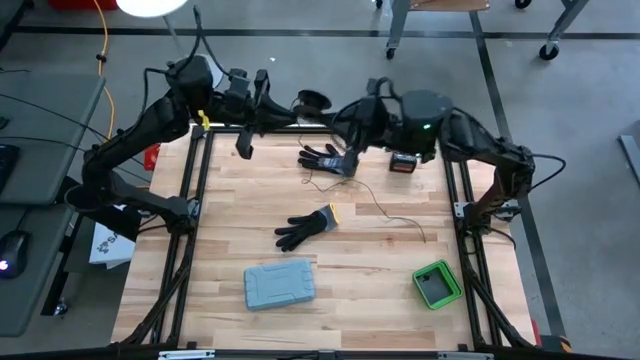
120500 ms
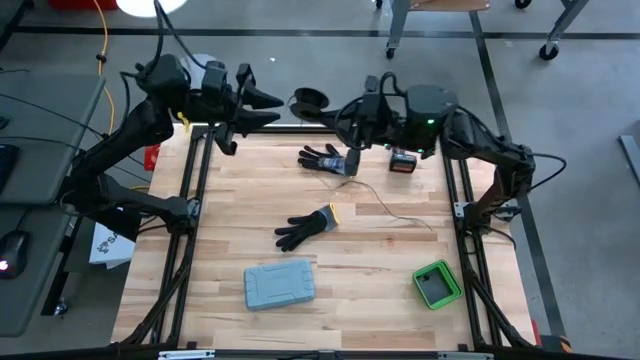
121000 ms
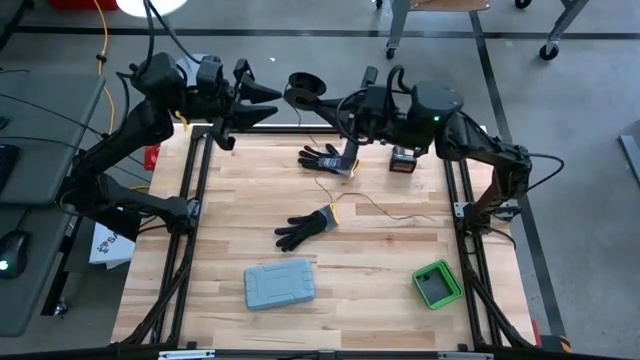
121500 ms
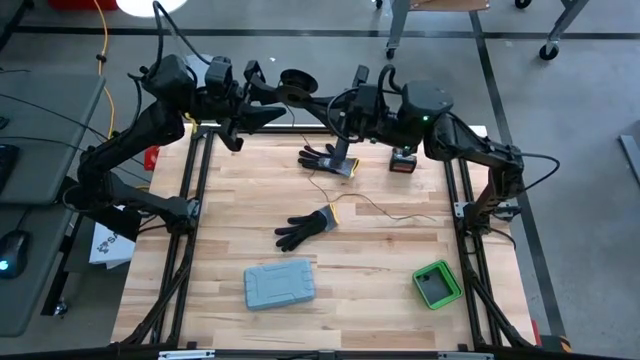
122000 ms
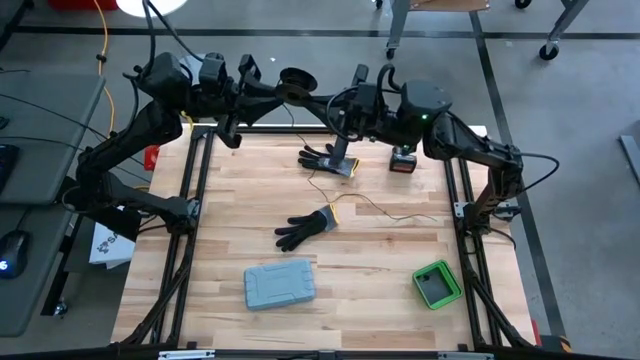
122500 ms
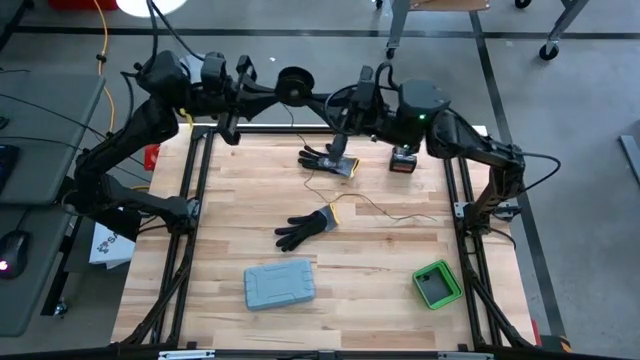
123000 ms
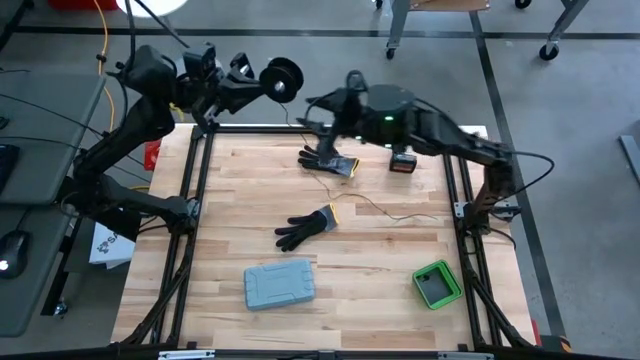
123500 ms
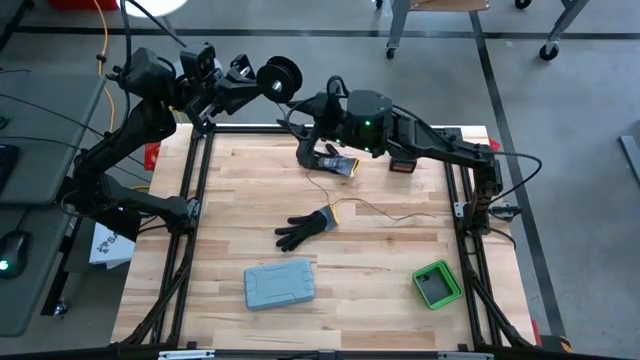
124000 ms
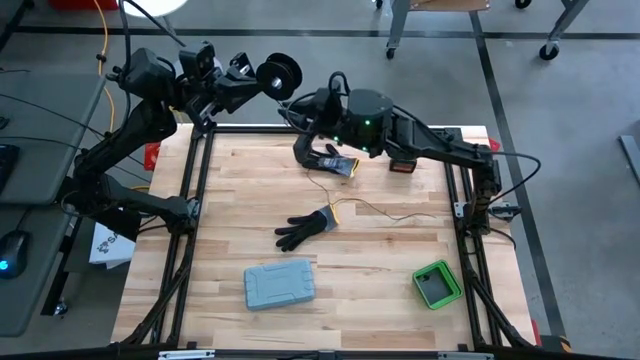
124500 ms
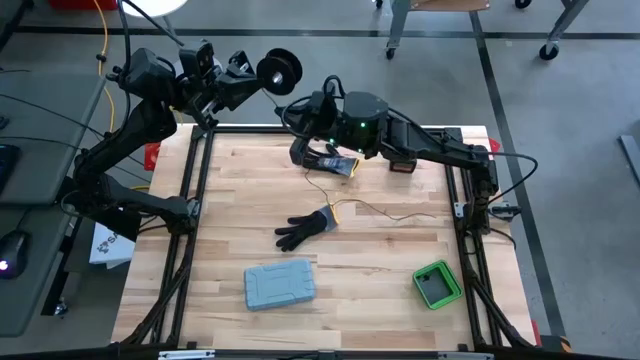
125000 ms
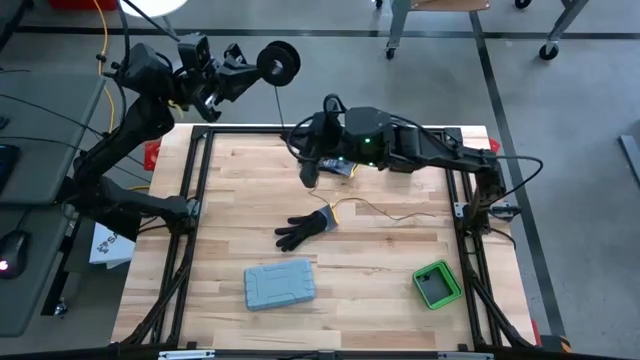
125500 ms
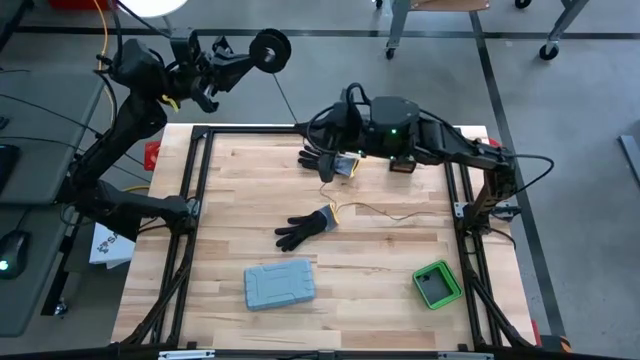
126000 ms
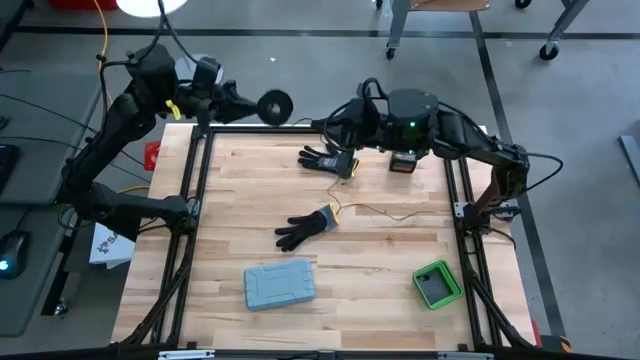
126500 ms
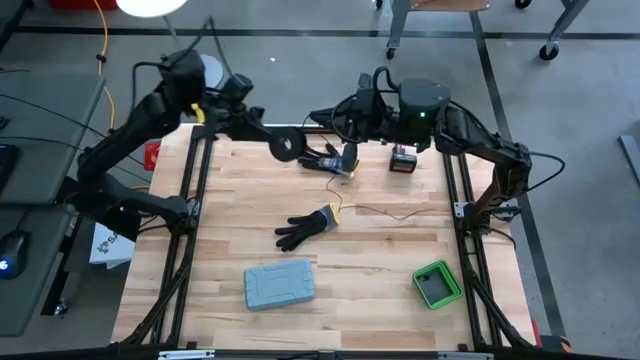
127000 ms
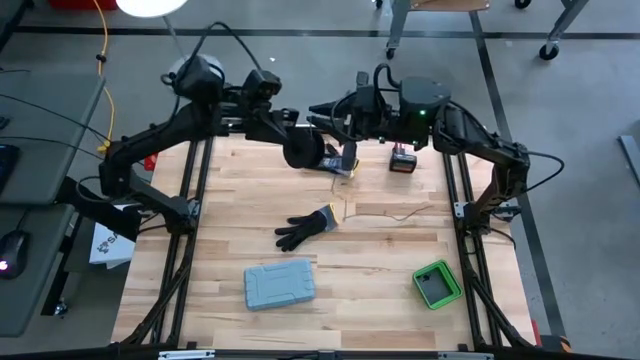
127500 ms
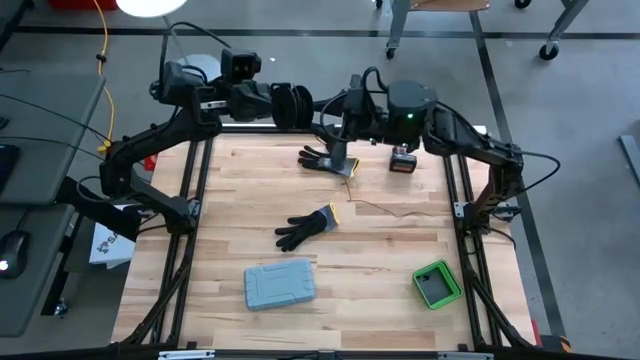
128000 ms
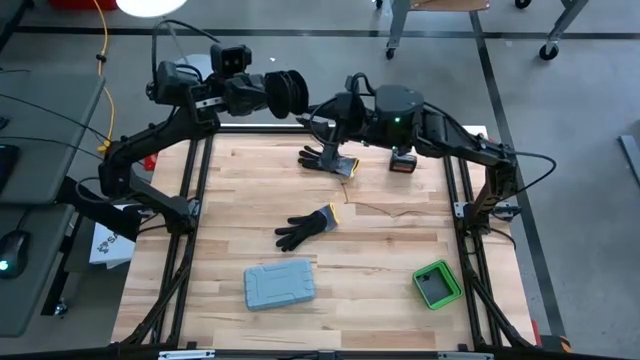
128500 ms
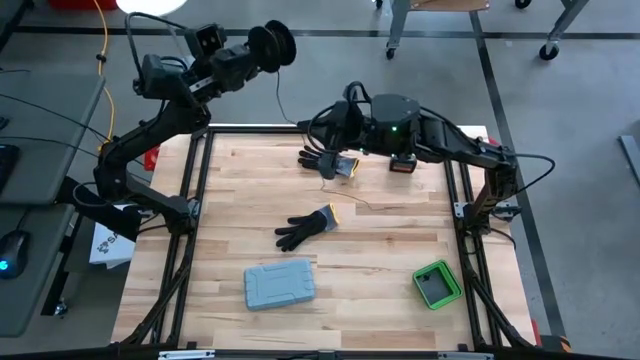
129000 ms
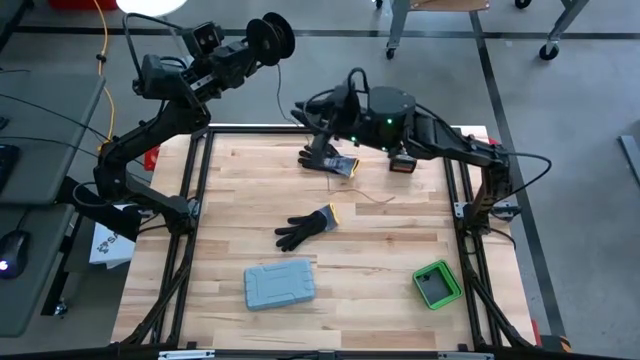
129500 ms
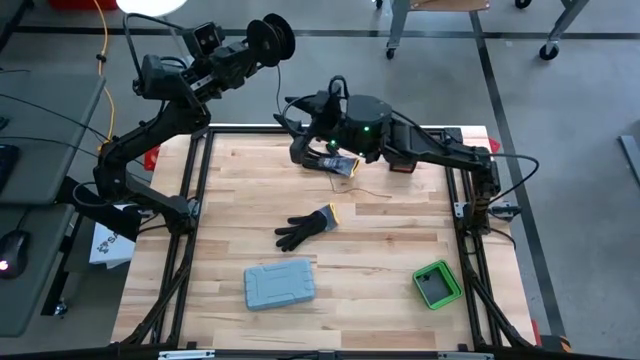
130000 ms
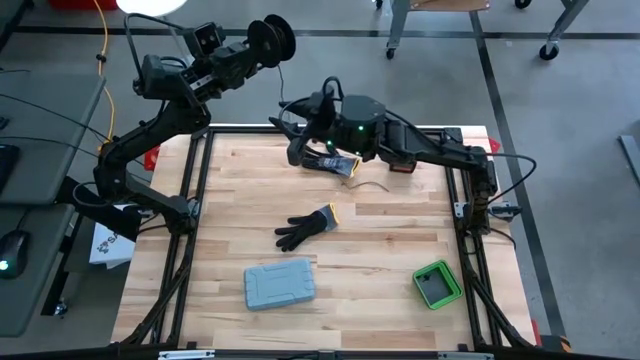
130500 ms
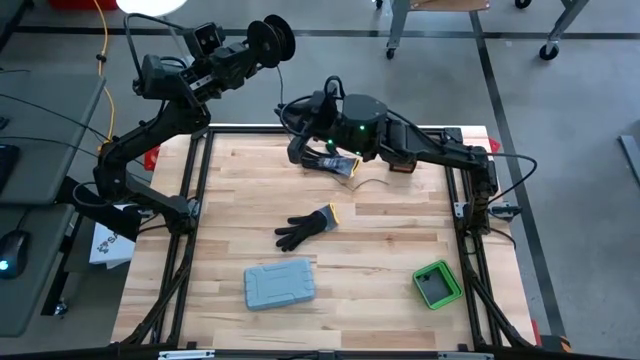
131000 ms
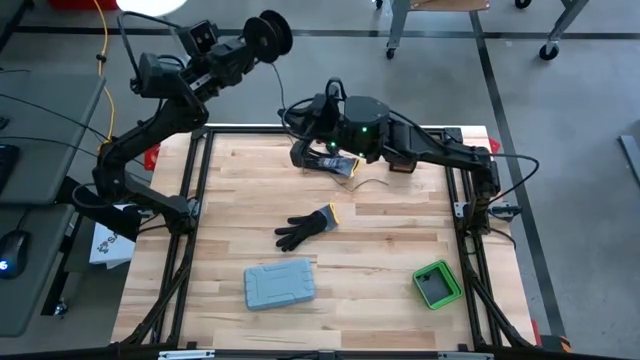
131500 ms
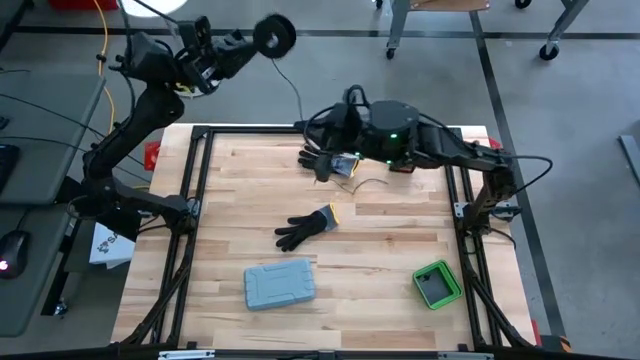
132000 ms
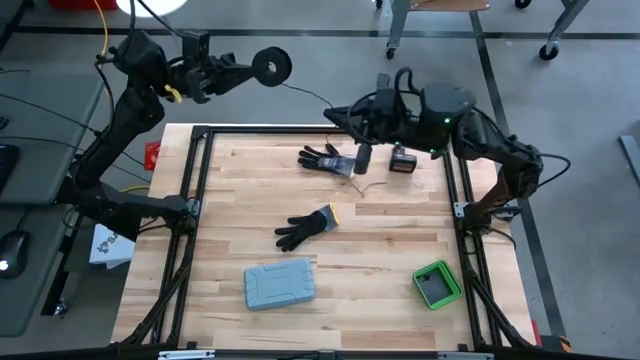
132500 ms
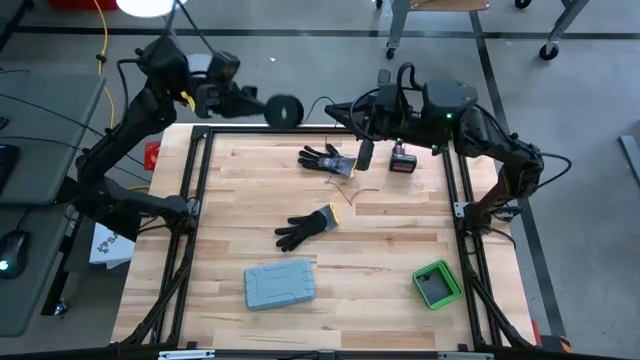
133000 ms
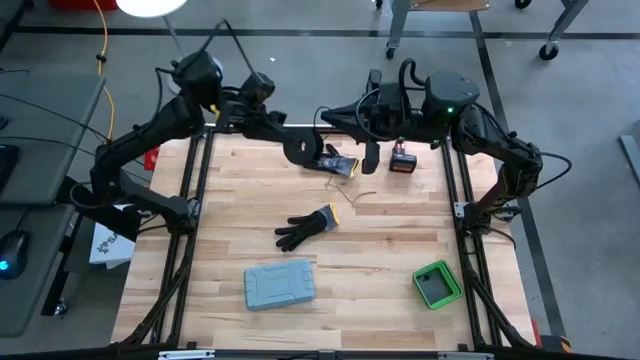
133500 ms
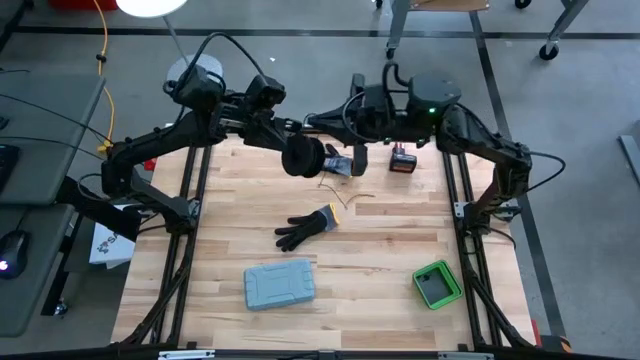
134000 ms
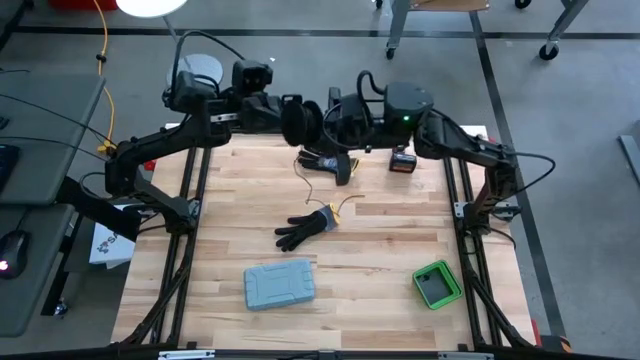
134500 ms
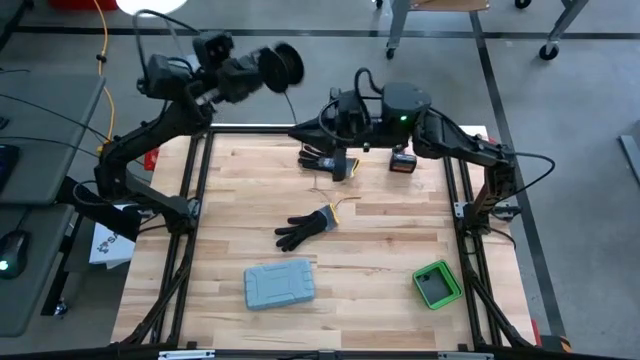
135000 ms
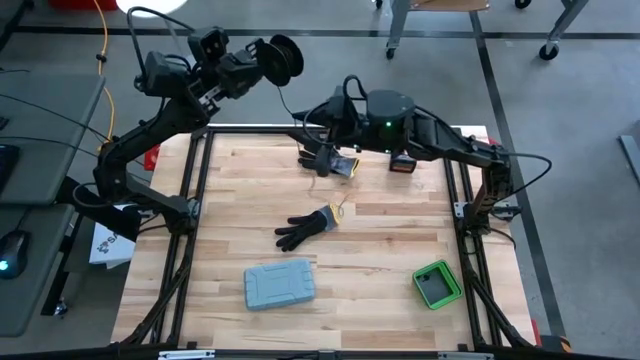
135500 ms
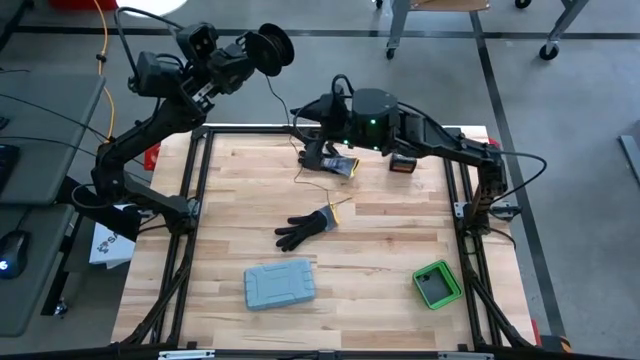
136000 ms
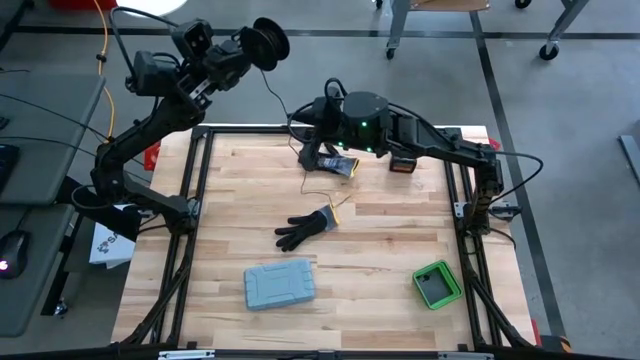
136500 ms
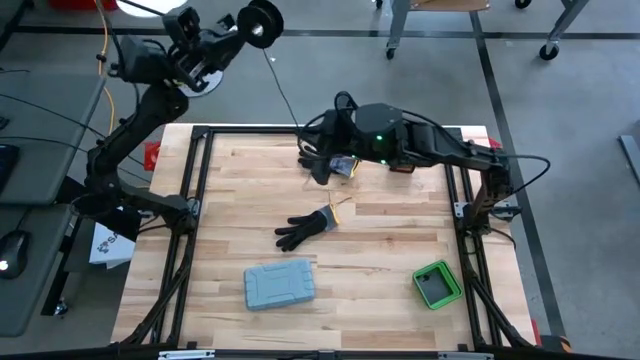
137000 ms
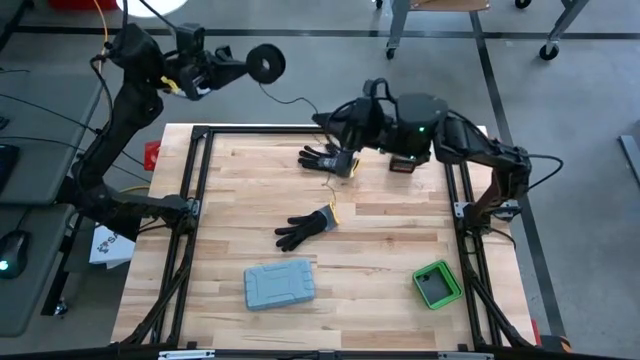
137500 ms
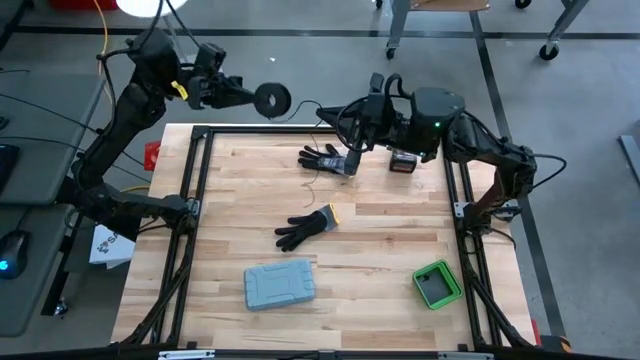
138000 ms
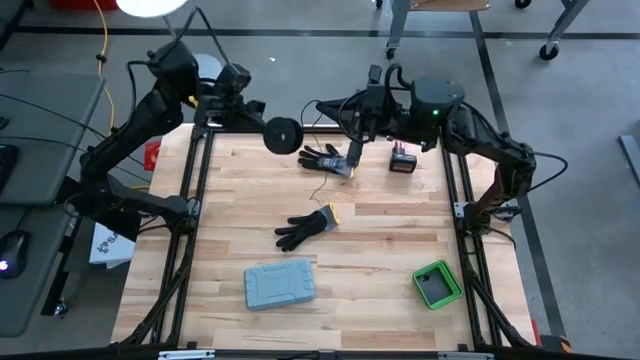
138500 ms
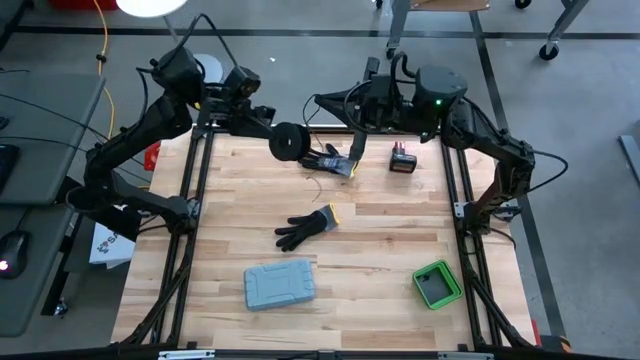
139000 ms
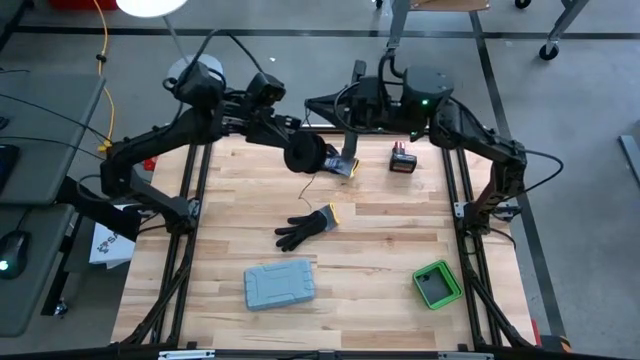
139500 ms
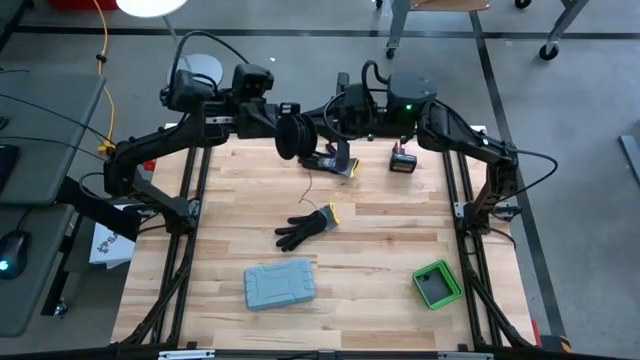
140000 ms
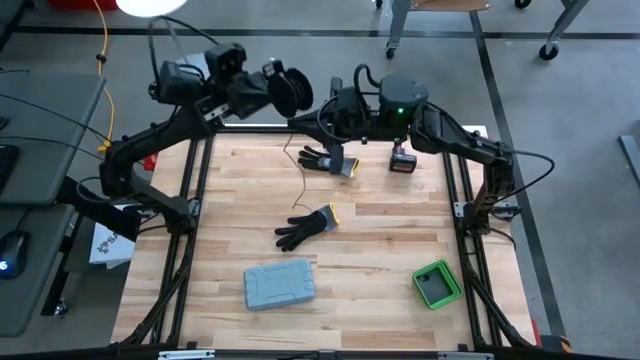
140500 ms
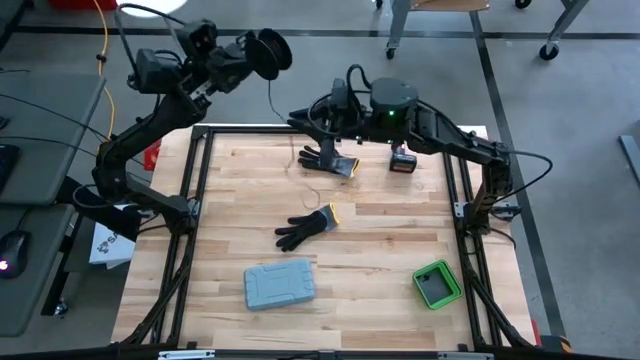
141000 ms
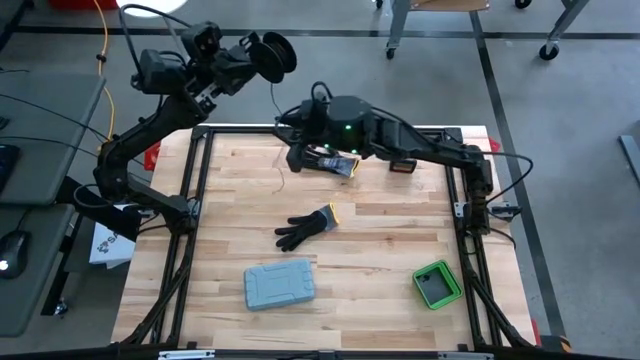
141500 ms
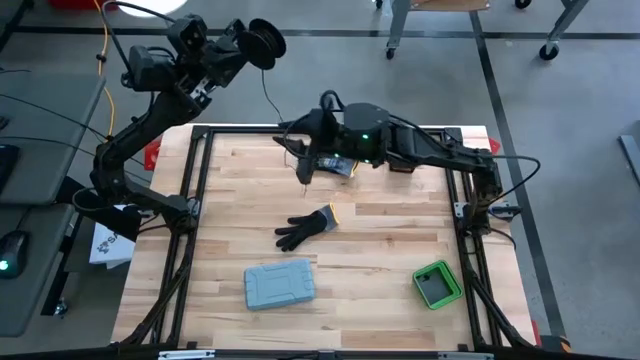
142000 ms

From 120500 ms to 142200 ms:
Task: Coil cords
Coil the black wire cable onto the black spool
